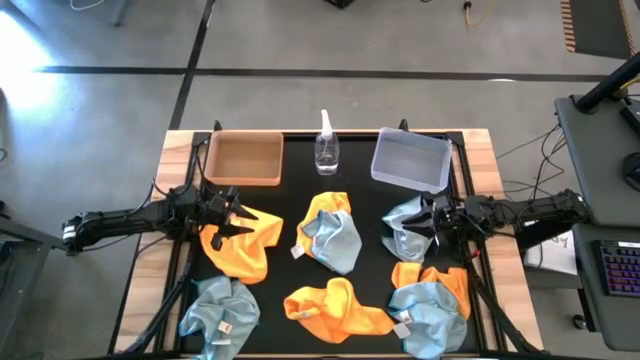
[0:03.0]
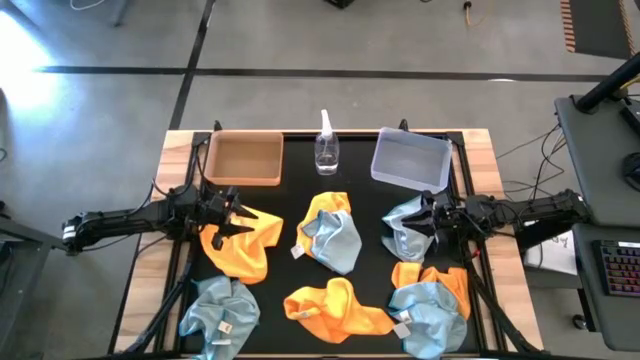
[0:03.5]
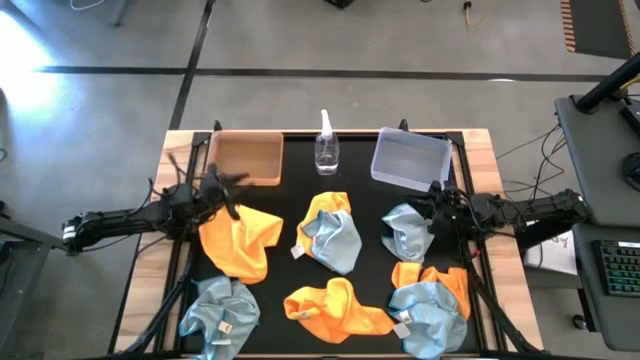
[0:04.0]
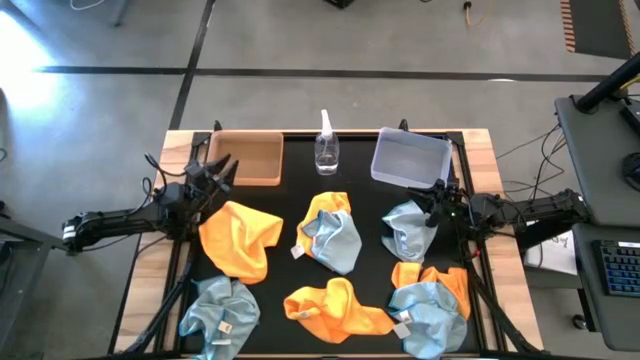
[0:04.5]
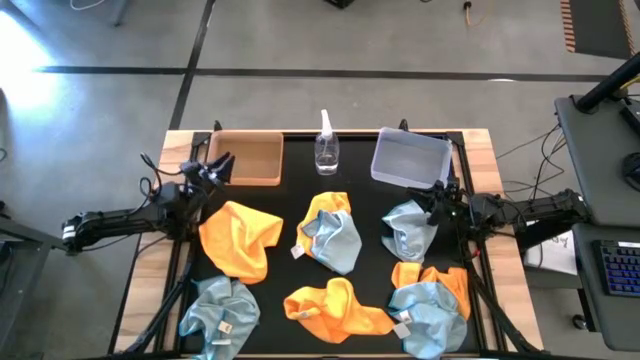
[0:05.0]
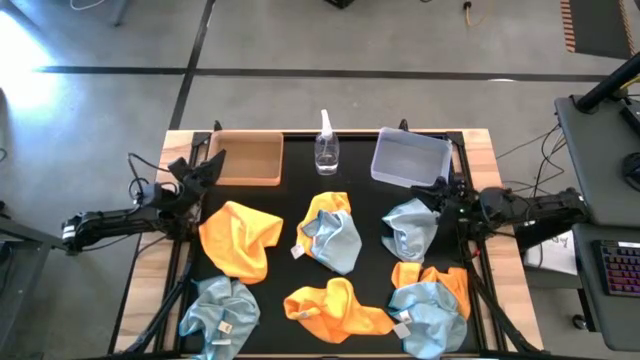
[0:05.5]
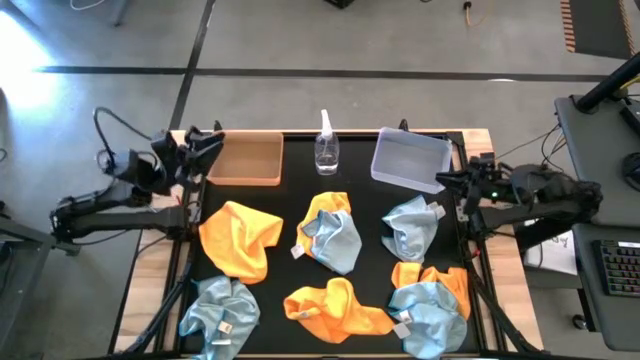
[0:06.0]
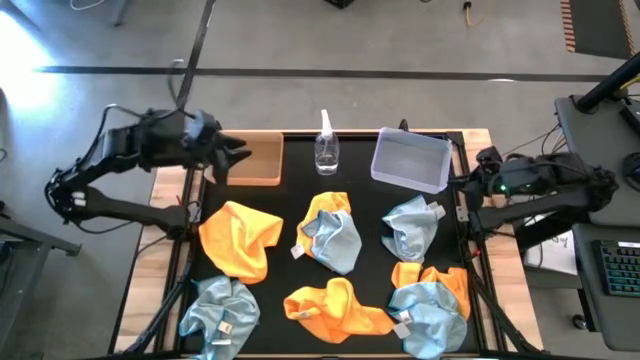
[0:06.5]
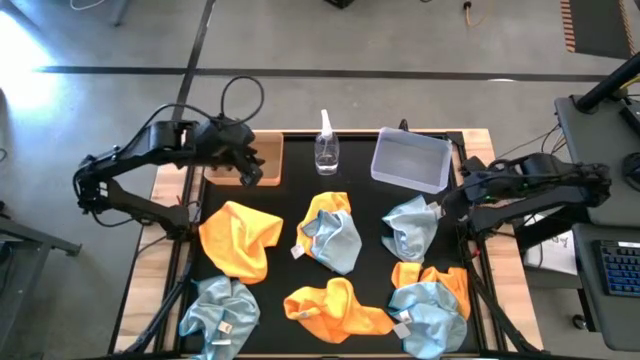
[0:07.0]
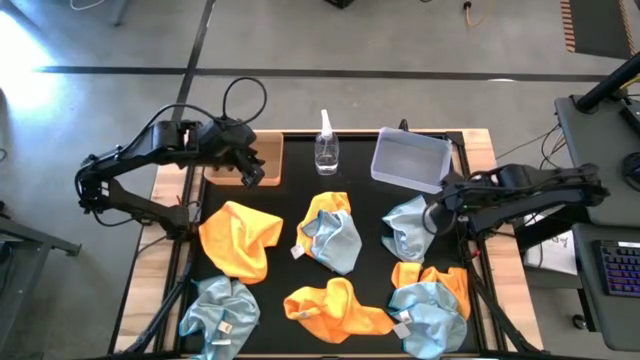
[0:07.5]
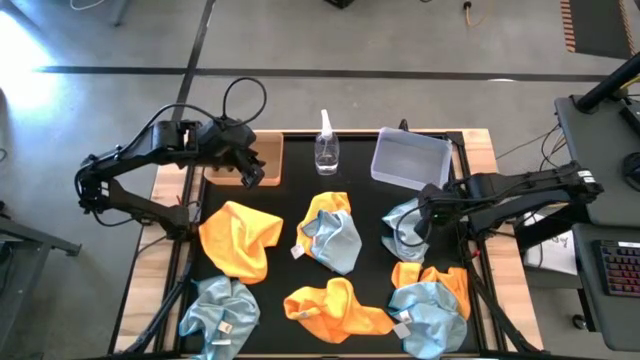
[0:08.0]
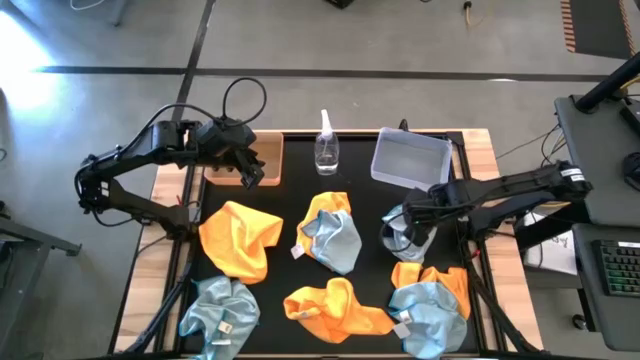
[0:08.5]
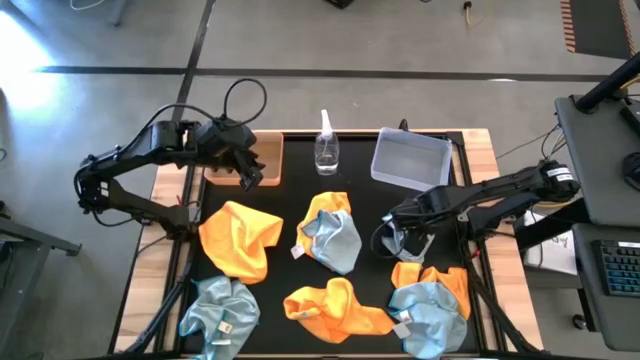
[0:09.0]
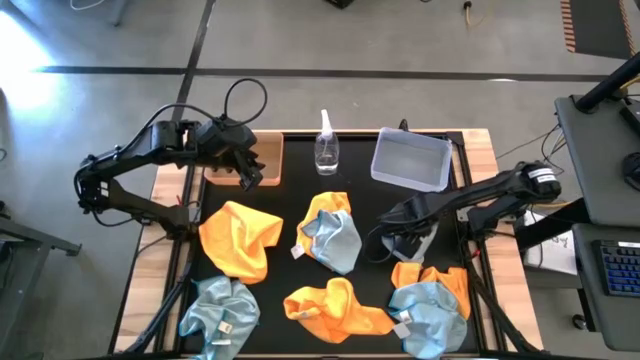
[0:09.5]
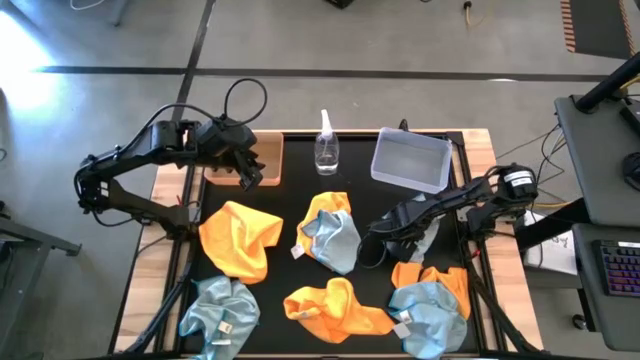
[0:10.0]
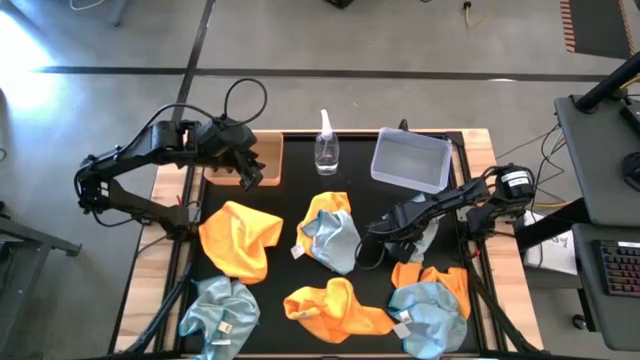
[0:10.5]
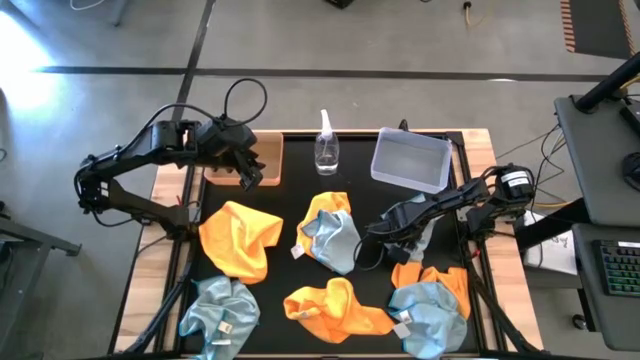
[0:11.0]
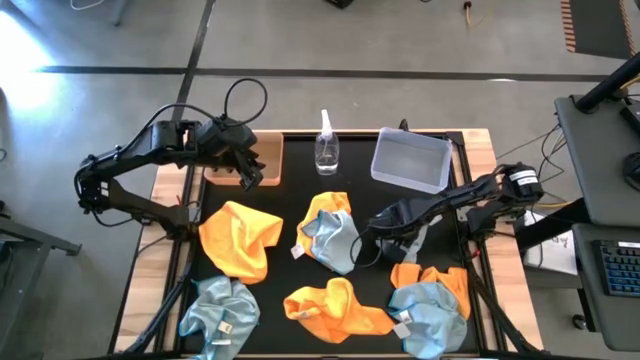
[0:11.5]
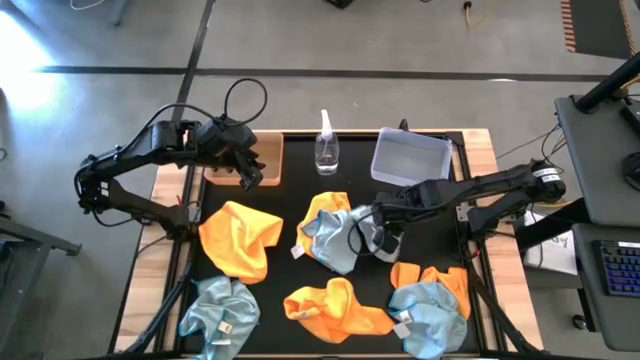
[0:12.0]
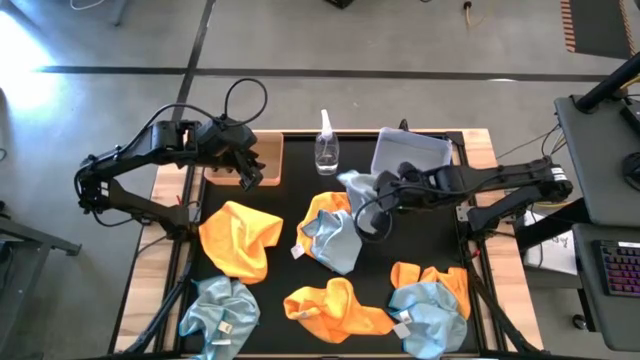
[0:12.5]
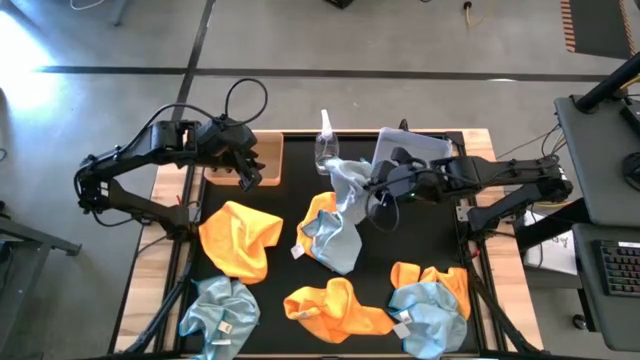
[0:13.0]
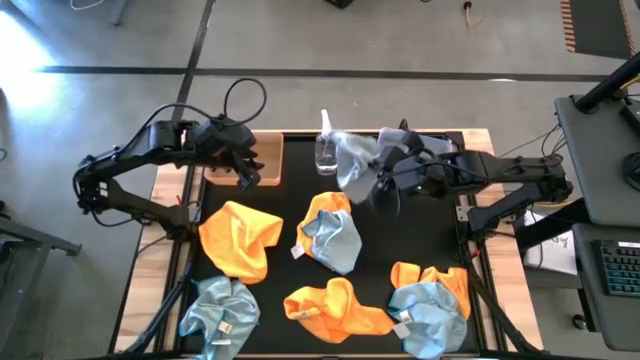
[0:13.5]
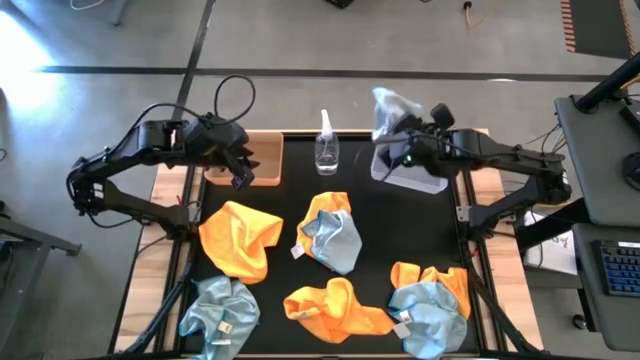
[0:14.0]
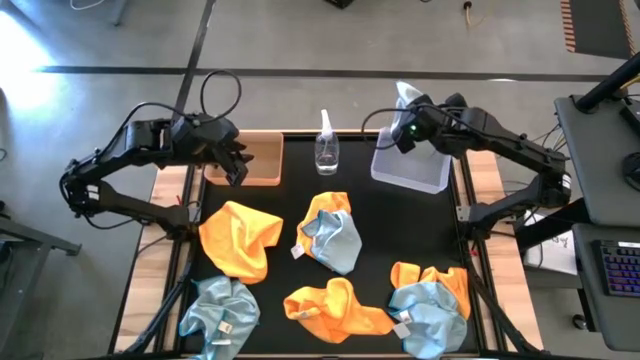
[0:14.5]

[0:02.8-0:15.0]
Task: Sort microfiber towel by color & place in baskets
Put the blue towel into the transparent bin

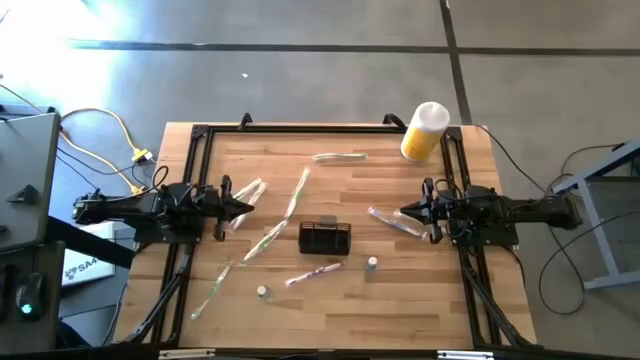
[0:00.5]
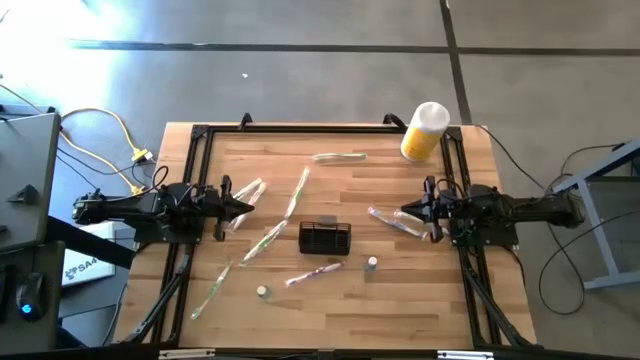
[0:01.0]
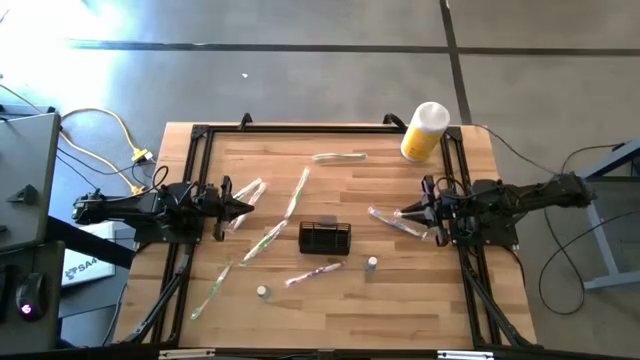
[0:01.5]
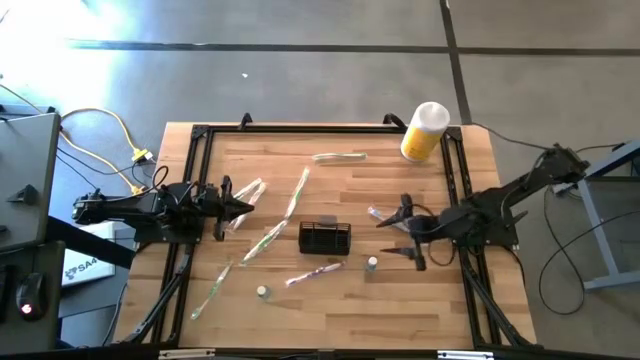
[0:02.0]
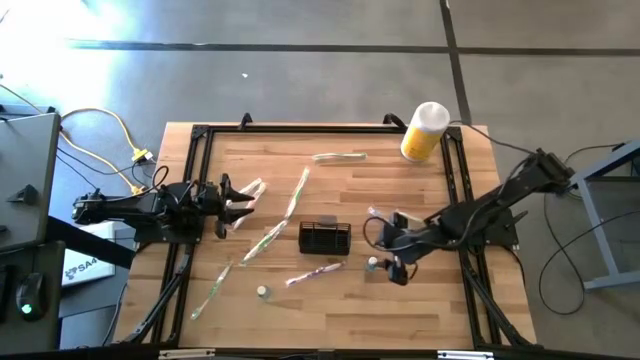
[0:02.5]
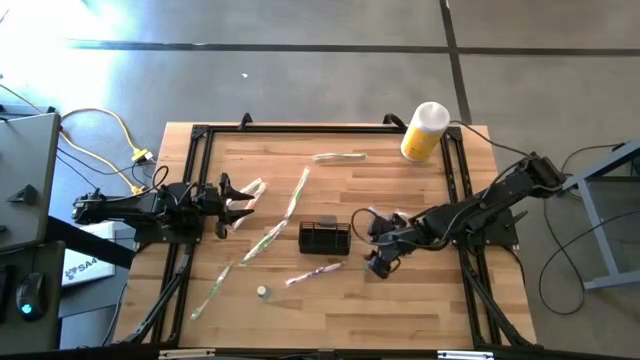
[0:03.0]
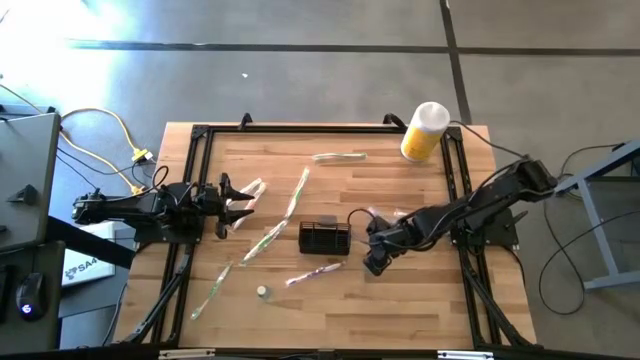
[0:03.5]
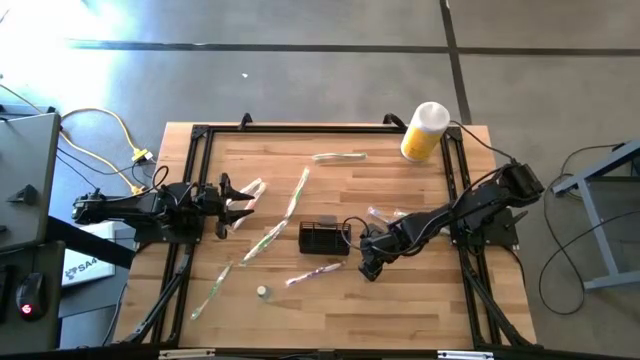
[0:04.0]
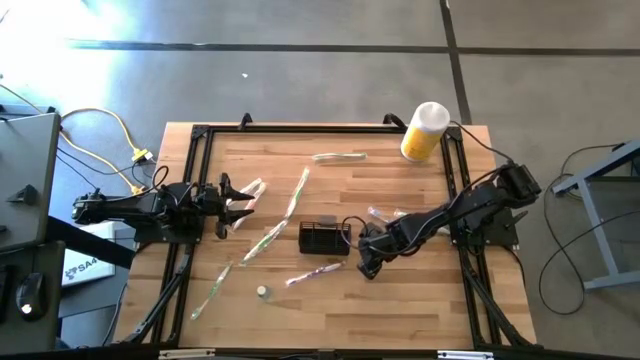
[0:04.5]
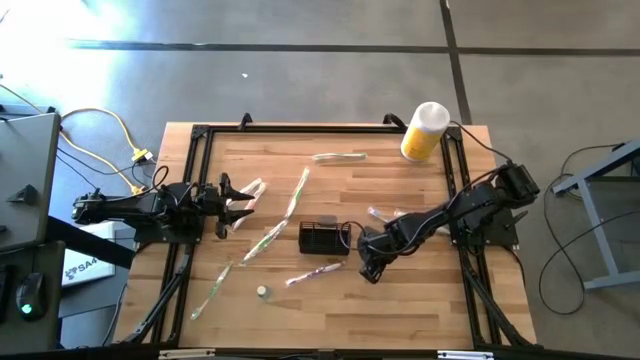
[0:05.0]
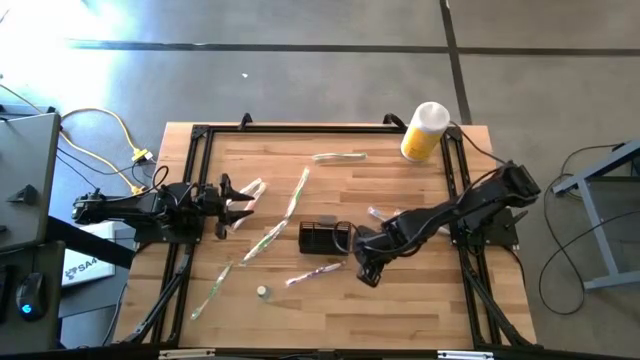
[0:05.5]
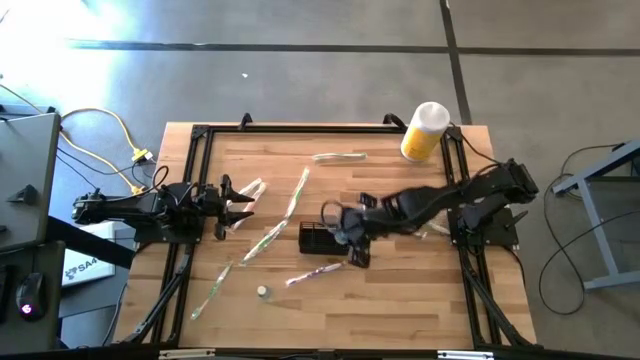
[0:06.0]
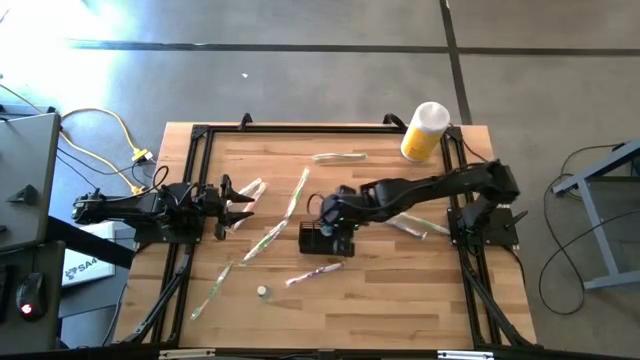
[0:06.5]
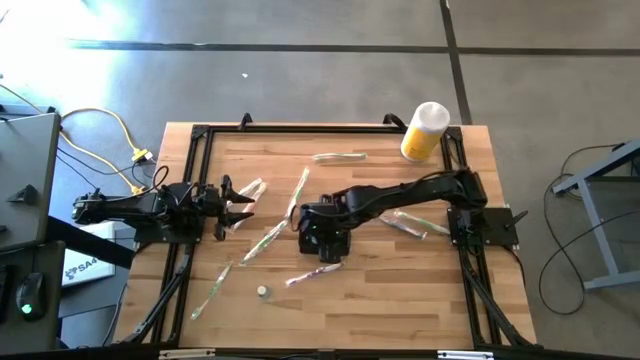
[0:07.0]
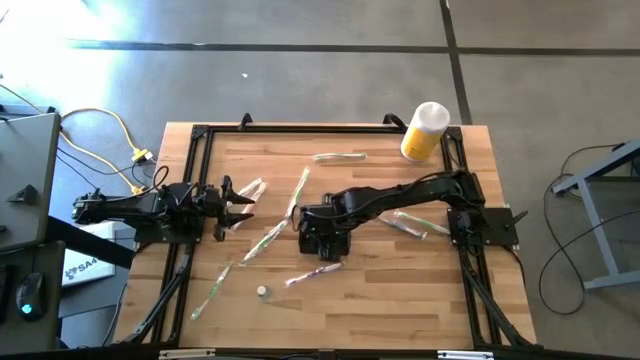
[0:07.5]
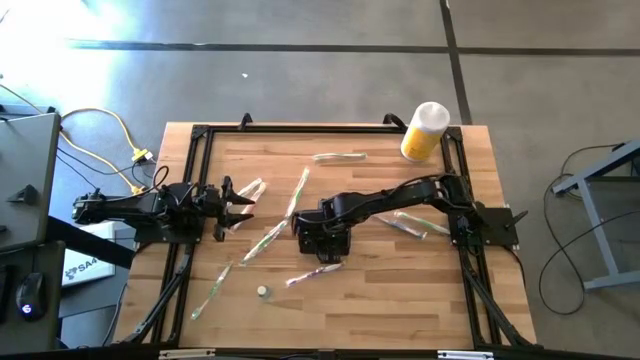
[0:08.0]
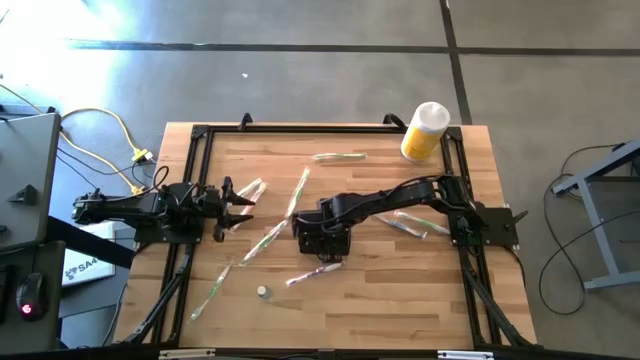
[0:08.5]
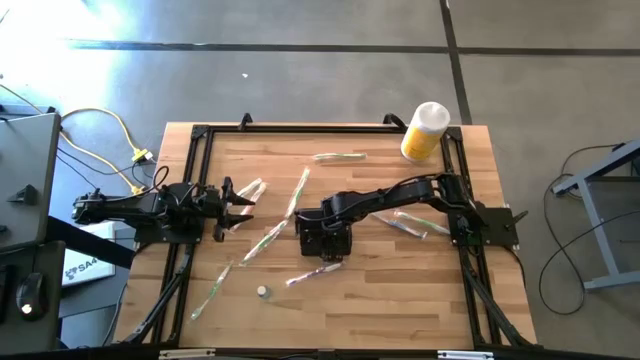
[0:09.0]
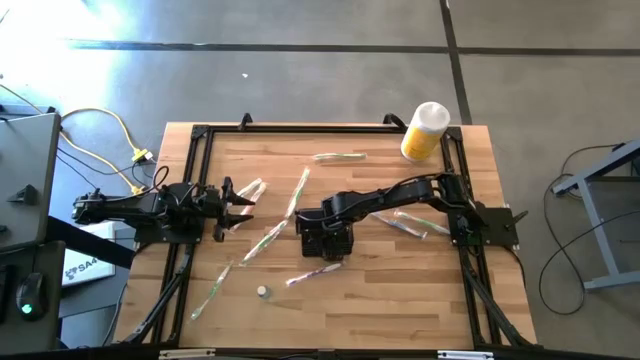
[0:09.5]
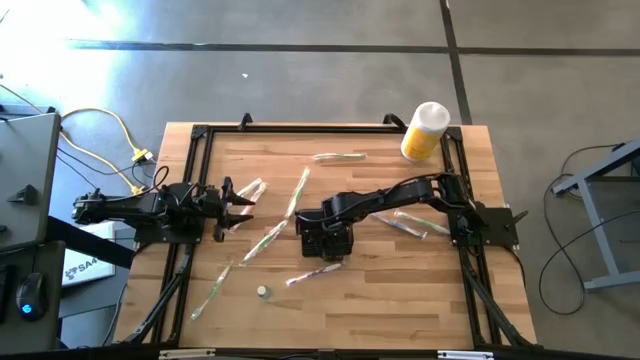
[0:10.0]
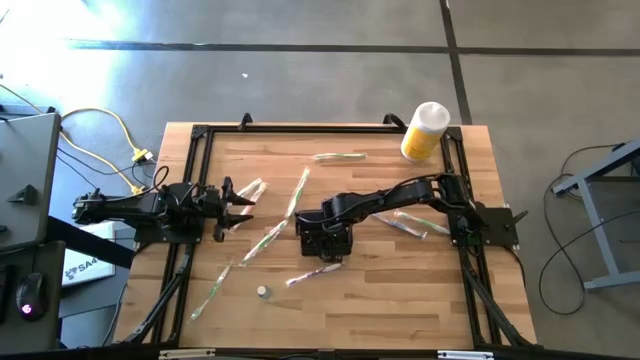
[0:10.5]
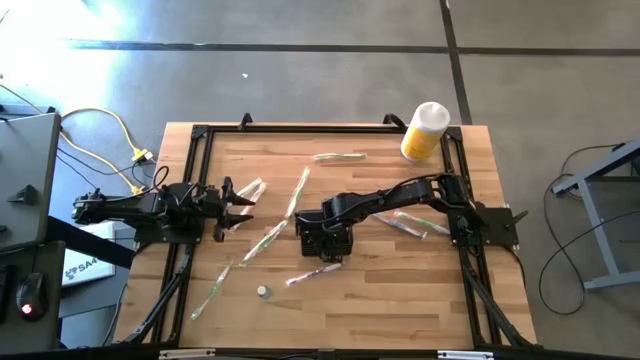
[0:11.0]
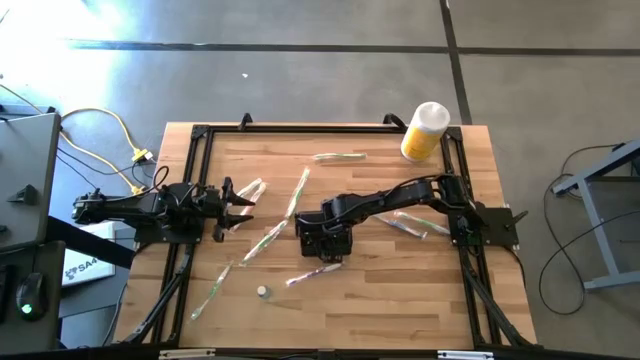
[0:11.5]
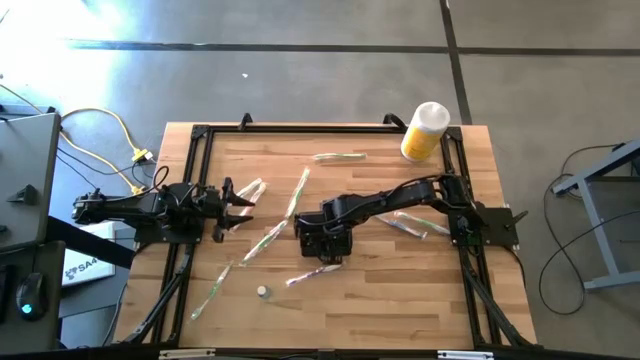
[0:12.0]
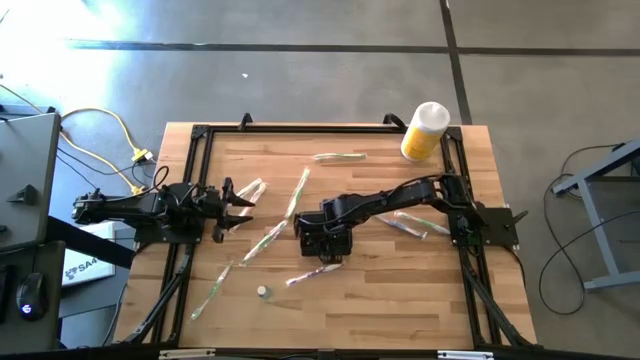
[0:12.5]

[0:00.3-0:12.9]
Task: Pick & Place toothbrushing station
Put the right blue mouthwash into the black wire organizer
